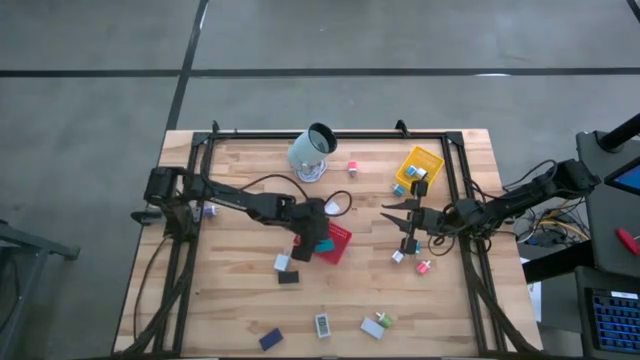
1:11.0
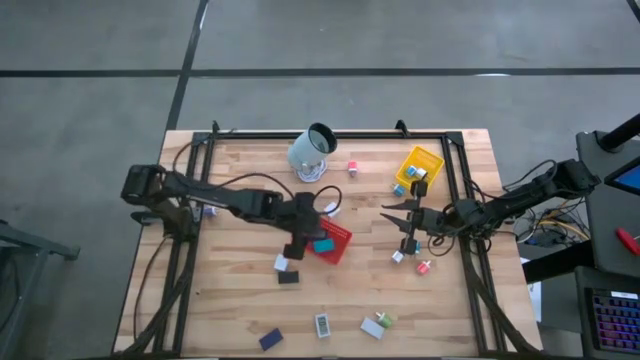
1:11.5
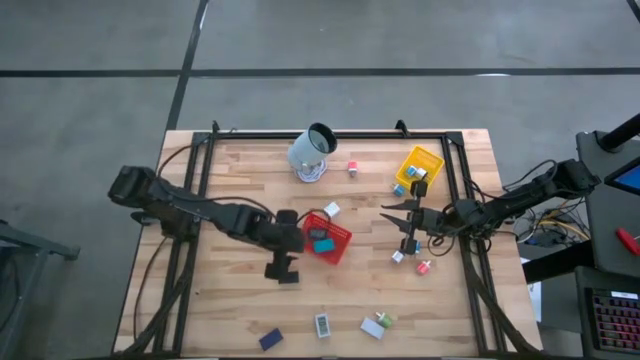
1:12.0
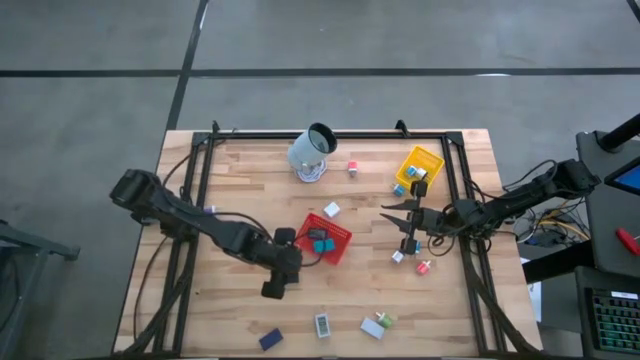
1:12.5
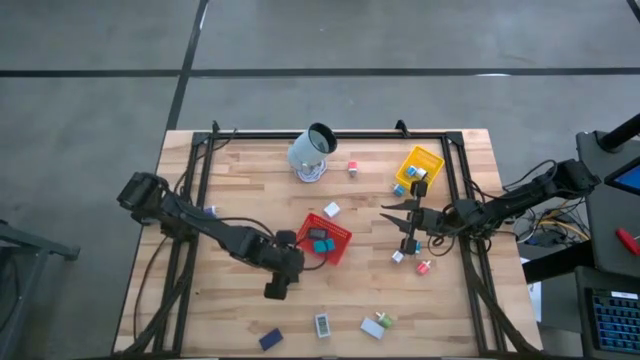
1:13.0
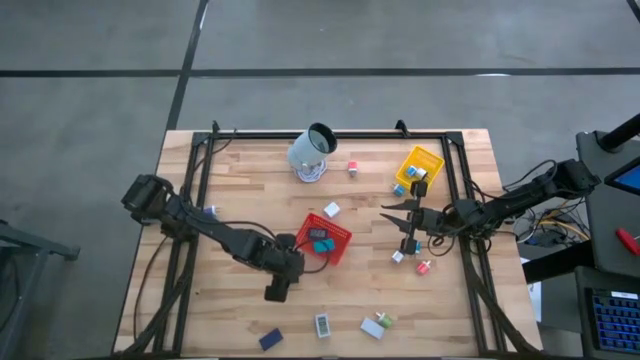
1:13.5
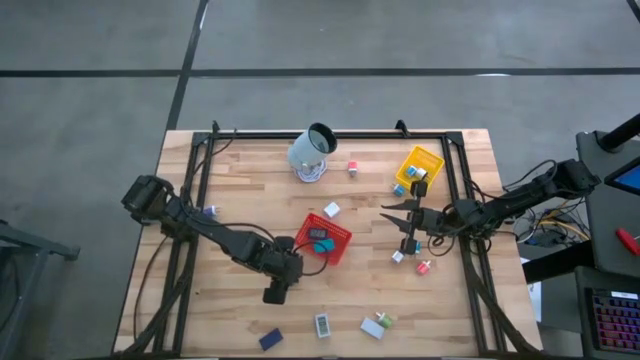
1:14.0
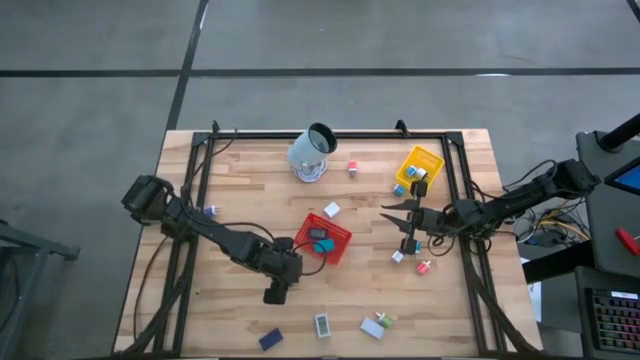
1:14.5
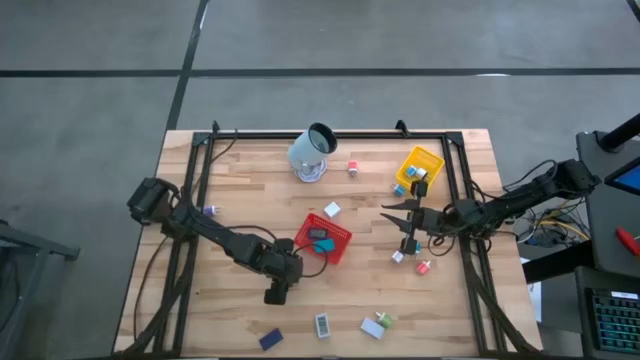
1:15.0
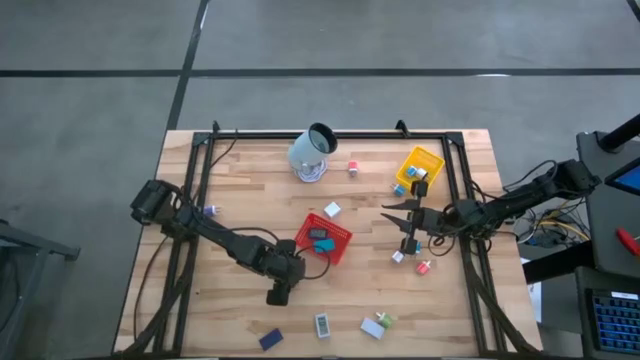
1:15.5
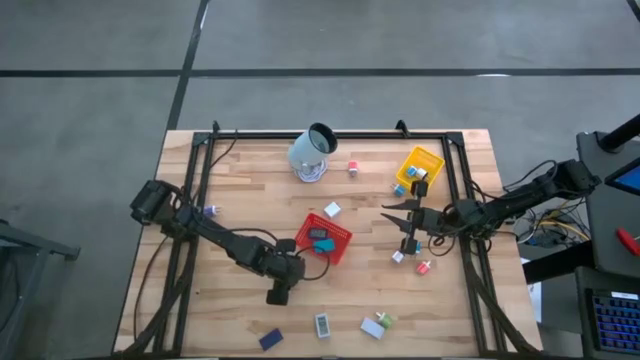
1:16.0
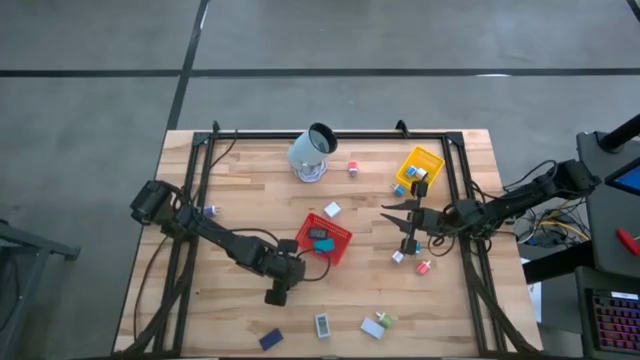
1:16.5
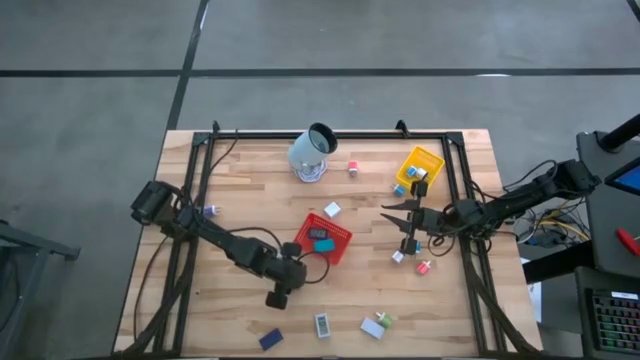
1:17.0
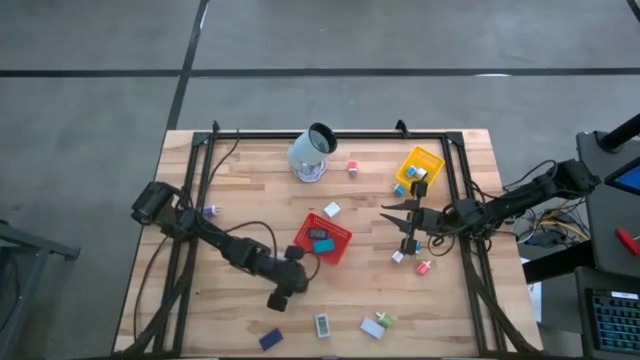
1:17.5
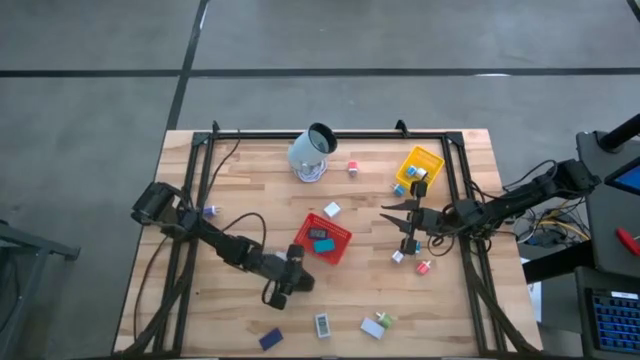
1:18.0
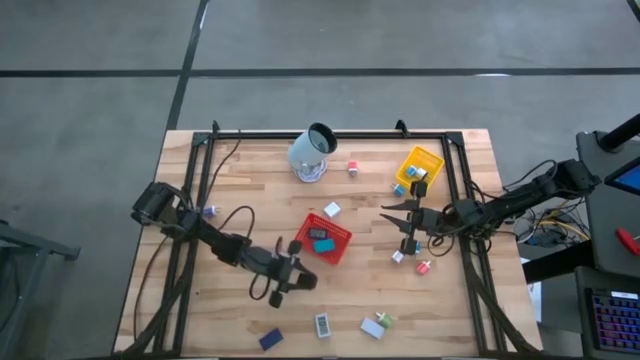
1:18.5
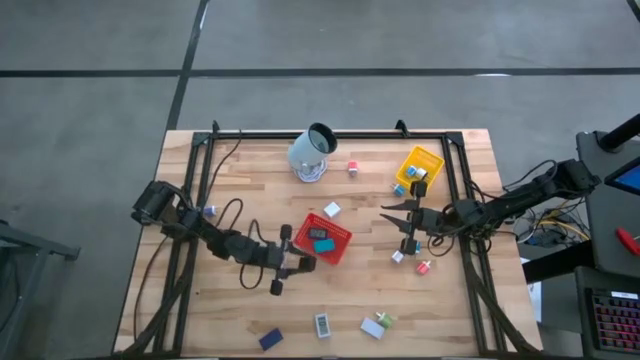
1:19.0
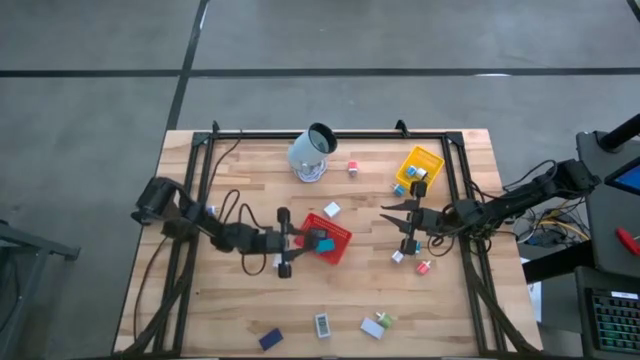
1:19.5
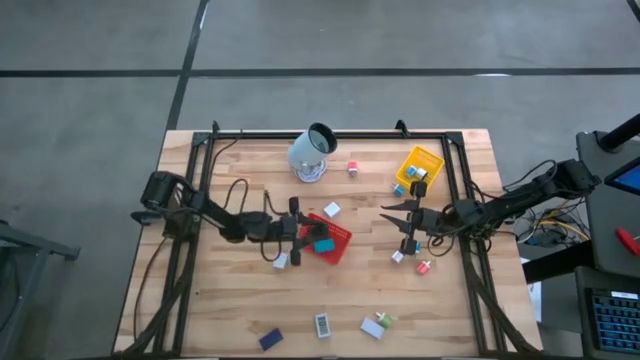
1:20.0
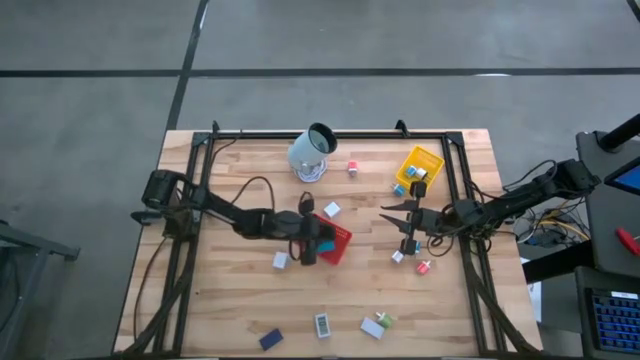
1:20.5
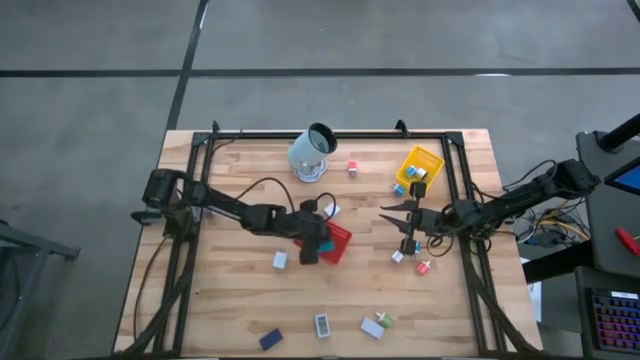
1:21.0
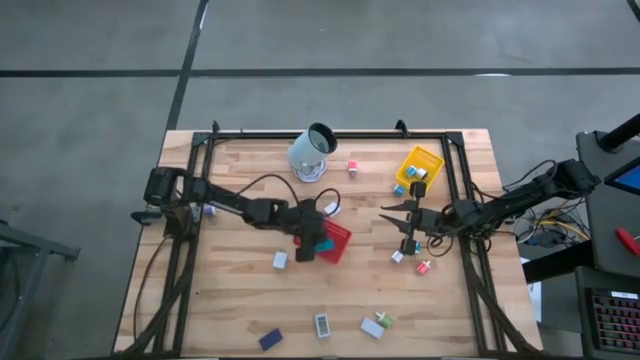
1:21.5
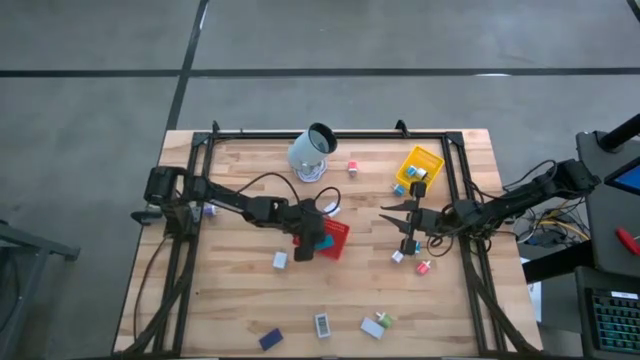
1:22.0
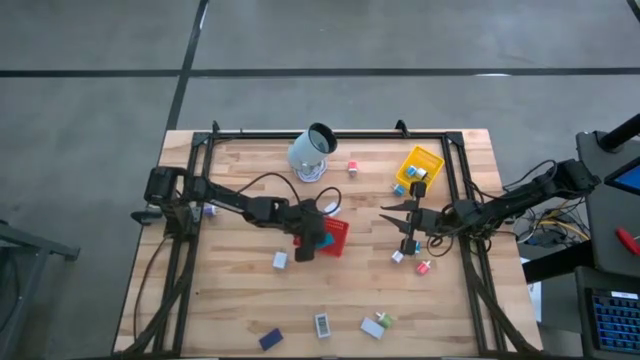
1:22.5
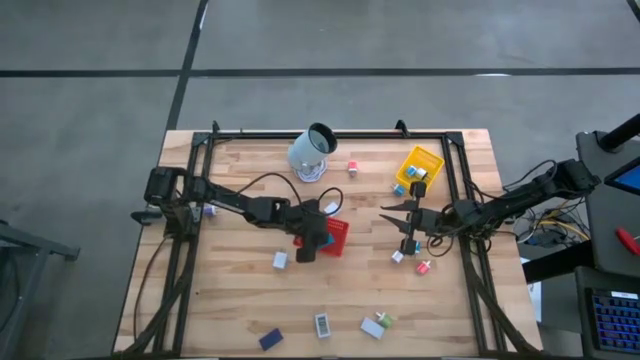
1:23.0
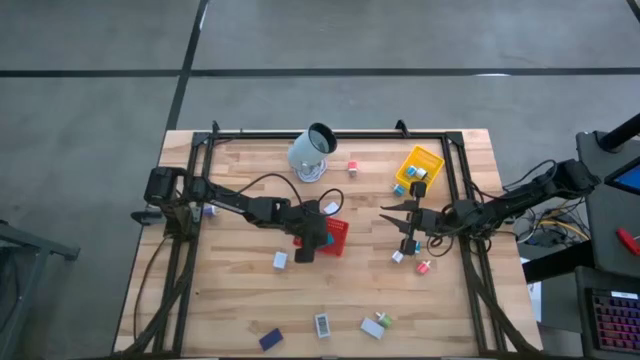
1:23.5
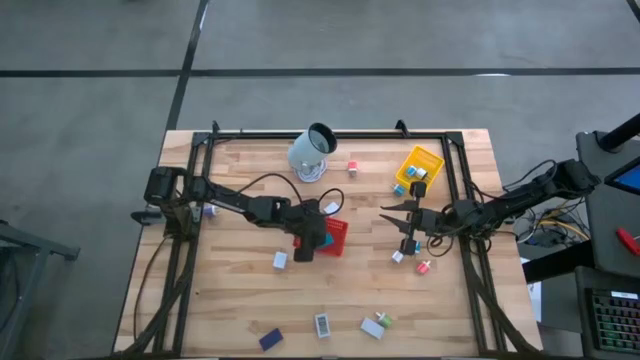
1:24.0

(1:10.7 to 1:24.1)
Task: Pick & Place Office items
Put the black digital clock into the red basket

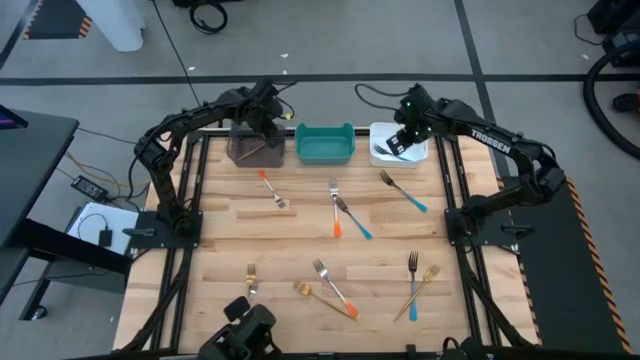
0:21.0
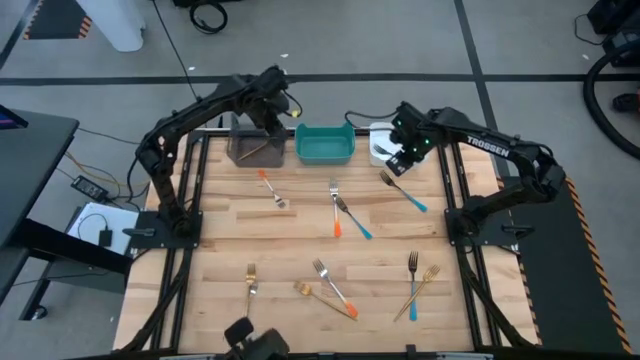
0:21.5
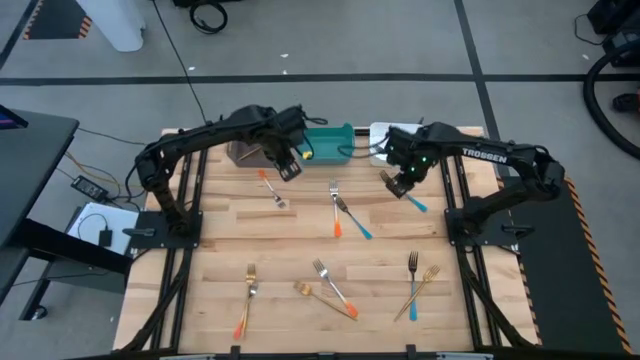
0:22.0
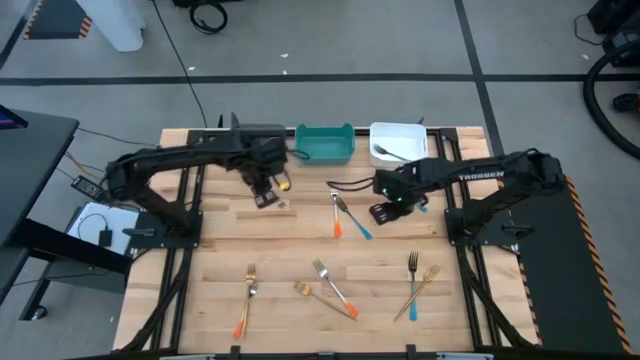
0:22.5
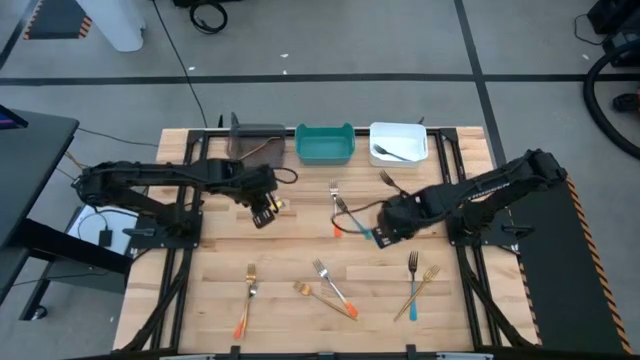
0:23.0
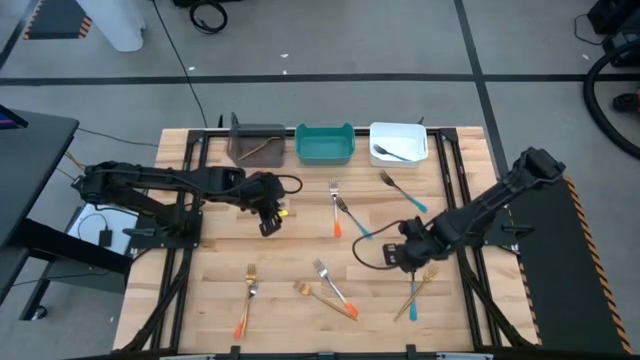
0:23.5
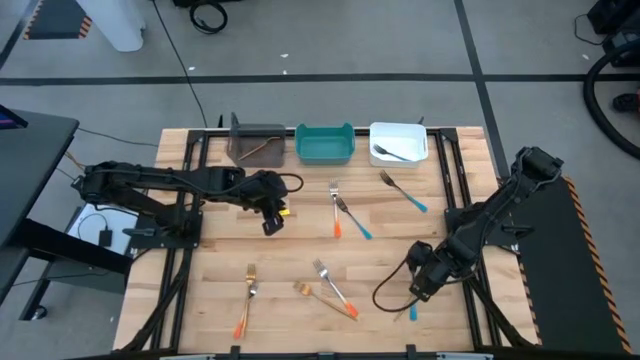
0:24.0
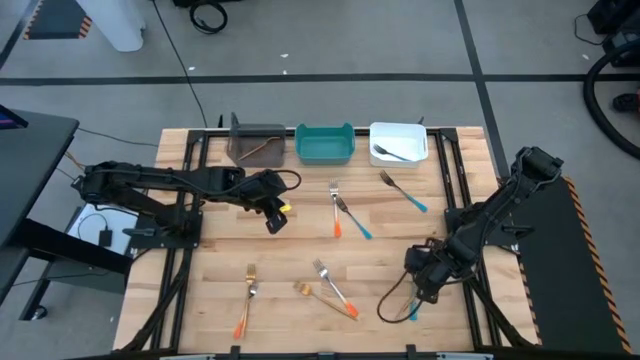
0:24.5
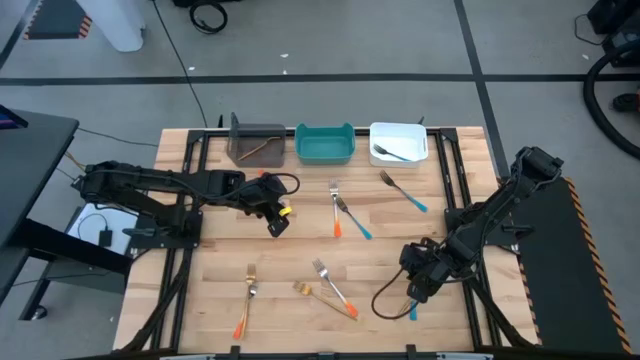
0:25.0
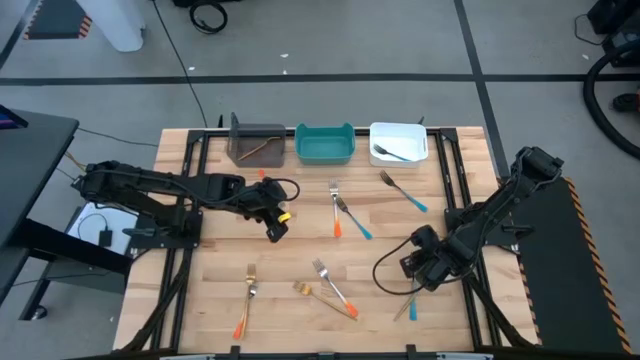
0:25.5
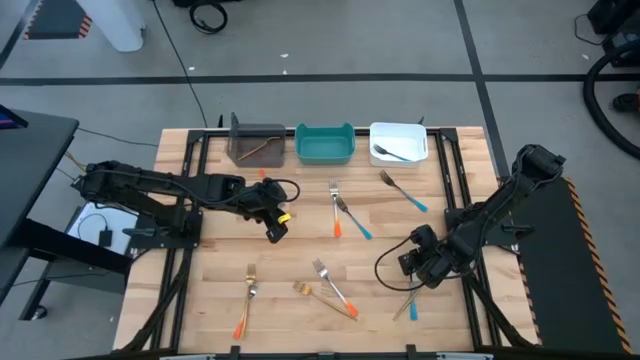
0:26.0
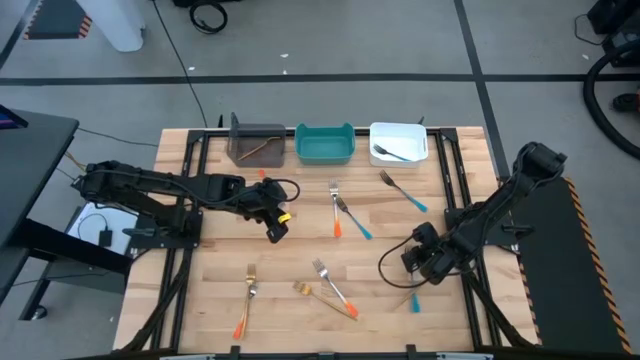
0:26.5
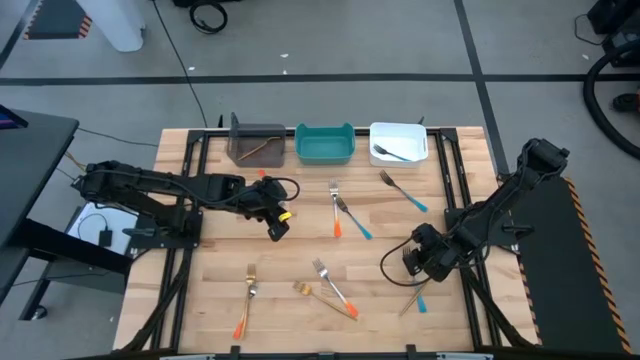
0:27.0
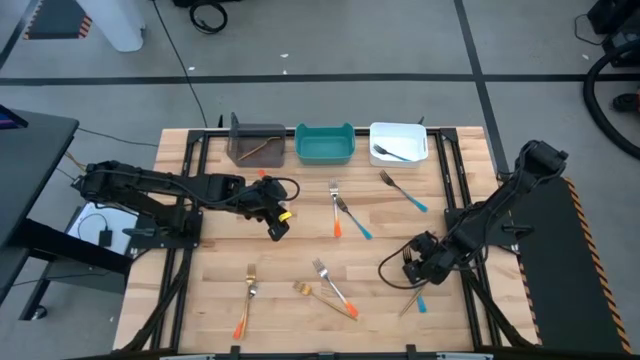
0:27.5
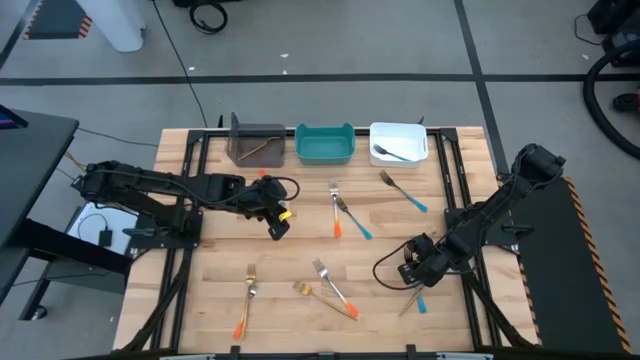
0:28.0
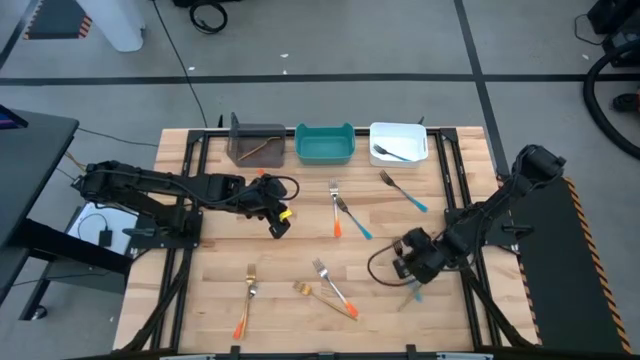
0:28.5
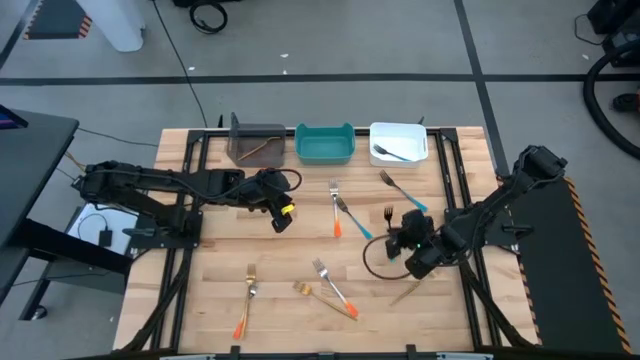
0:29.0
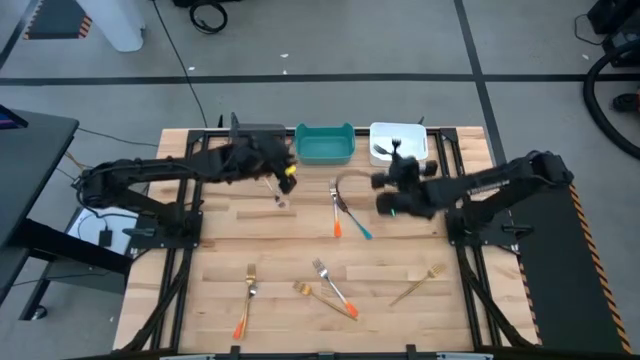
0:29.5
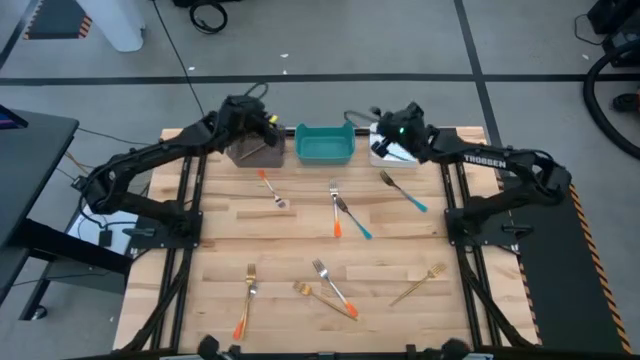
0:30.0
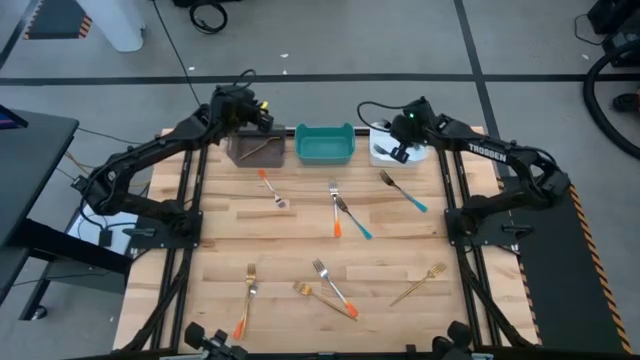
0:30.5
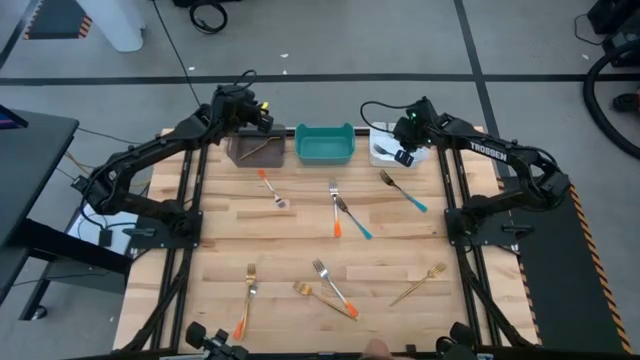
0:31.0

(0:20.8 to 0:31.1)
Task: Sort silverware by color (type)
Put the blue fork into the white bin
